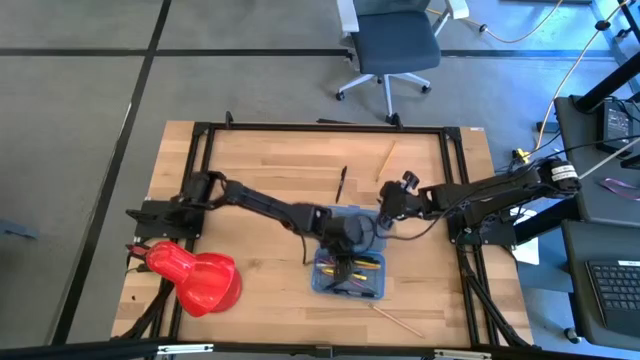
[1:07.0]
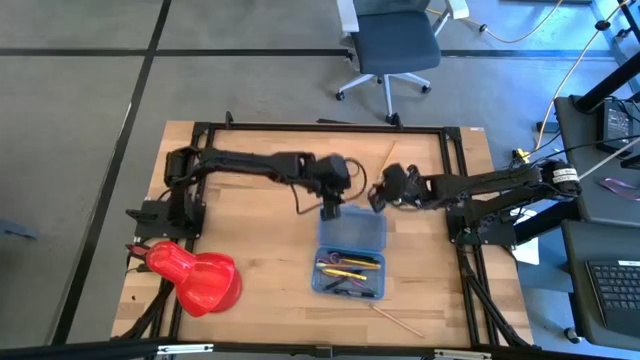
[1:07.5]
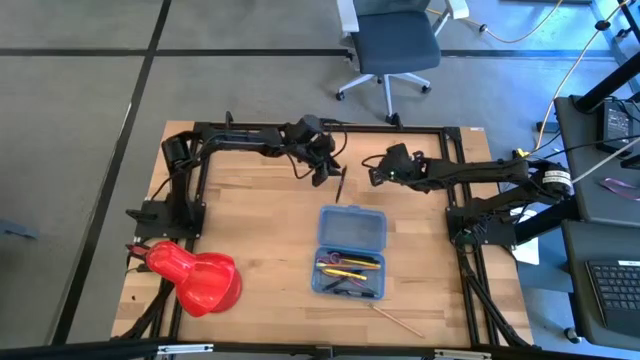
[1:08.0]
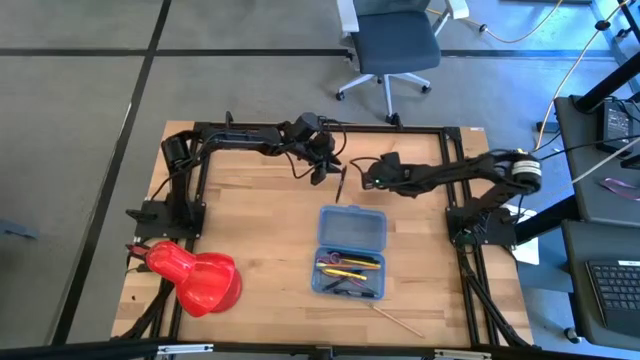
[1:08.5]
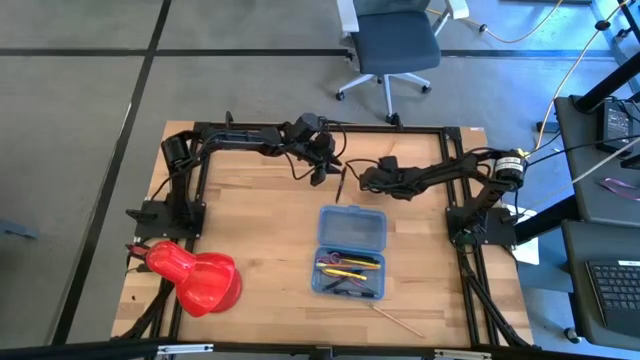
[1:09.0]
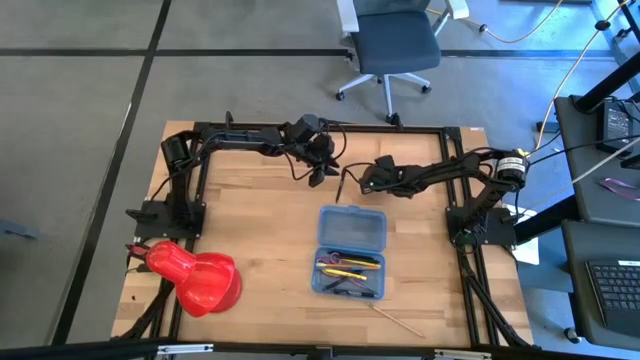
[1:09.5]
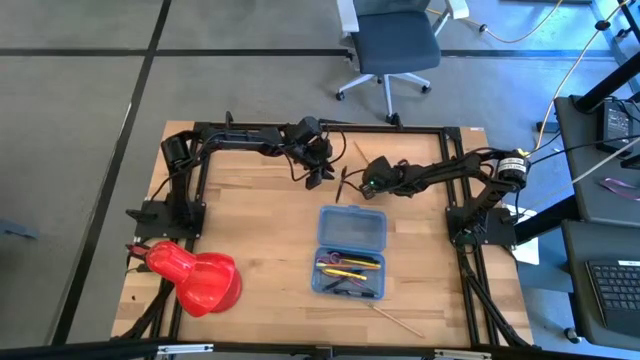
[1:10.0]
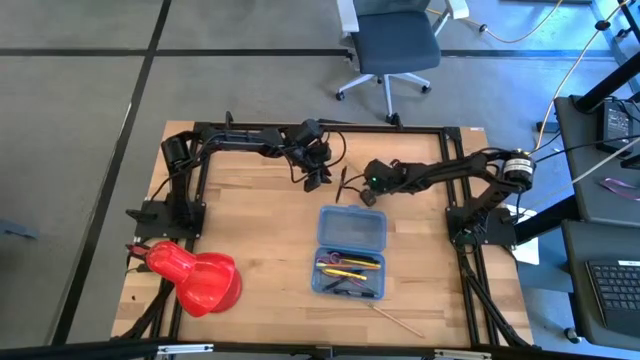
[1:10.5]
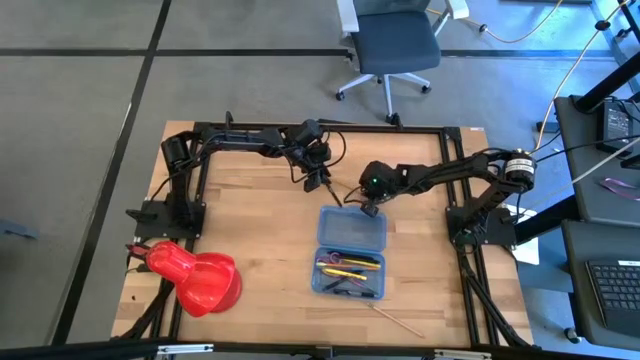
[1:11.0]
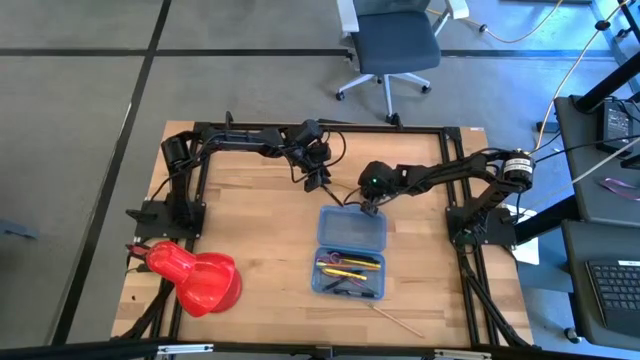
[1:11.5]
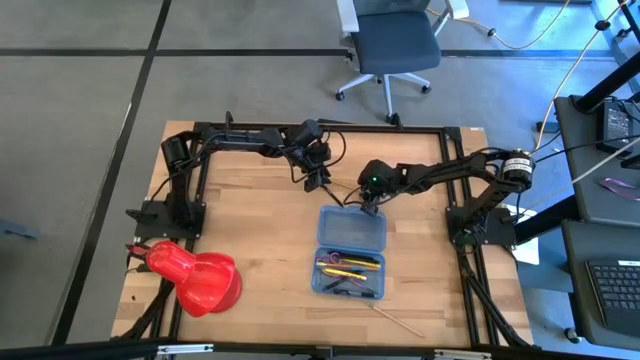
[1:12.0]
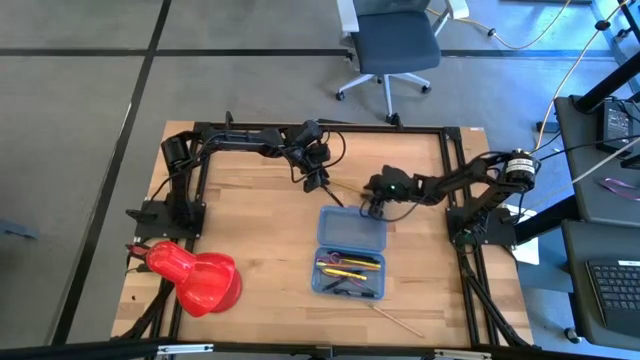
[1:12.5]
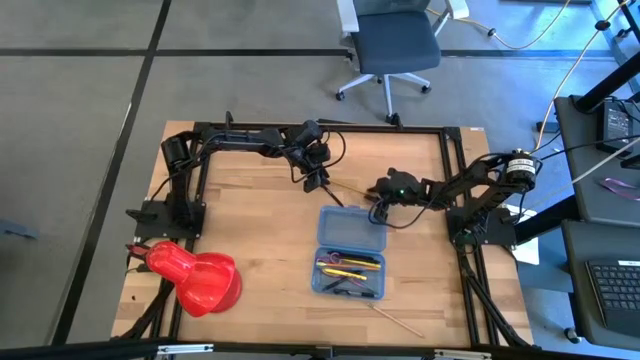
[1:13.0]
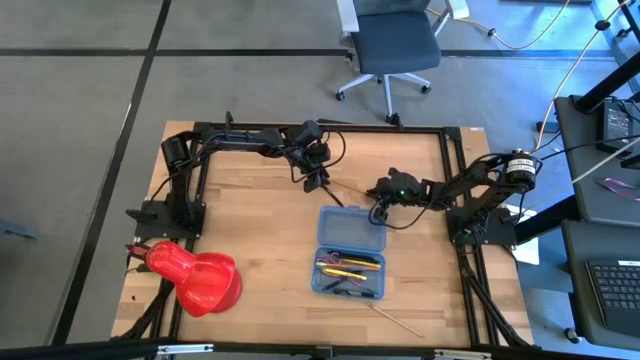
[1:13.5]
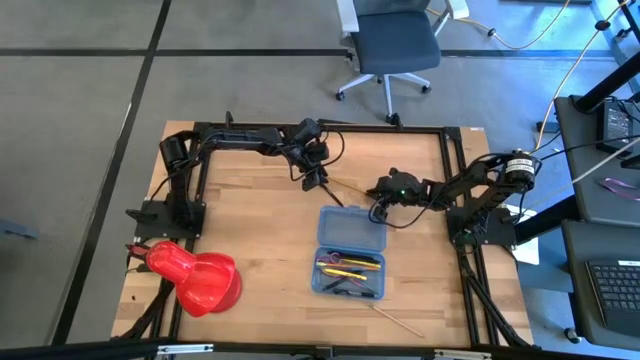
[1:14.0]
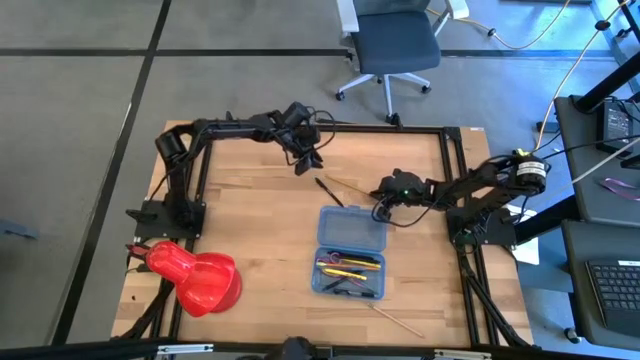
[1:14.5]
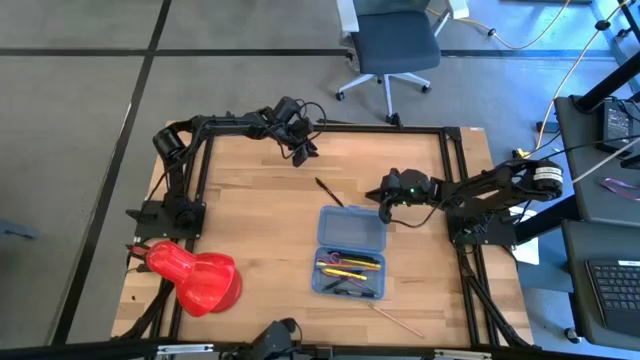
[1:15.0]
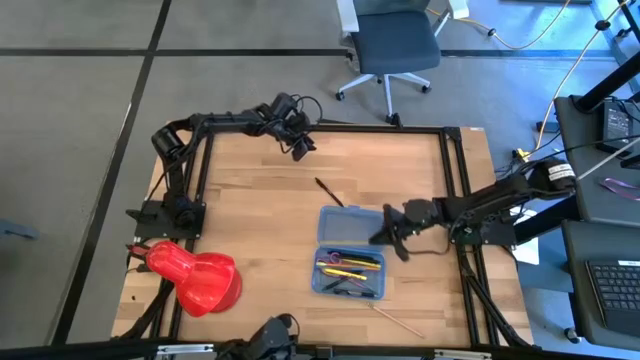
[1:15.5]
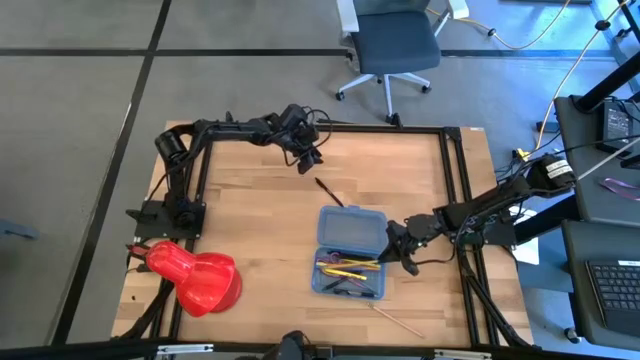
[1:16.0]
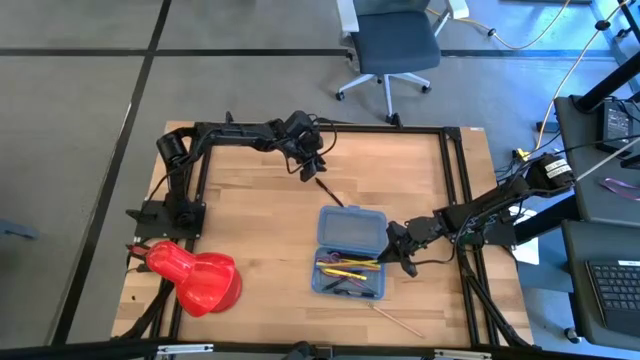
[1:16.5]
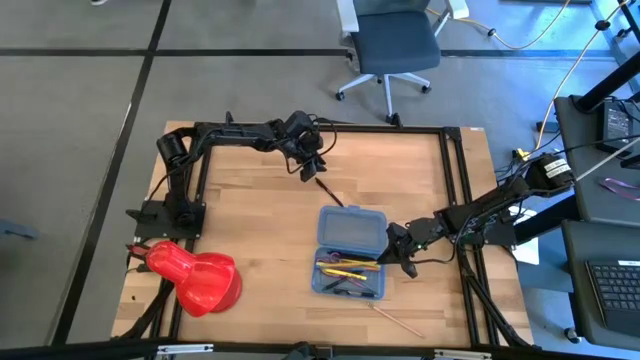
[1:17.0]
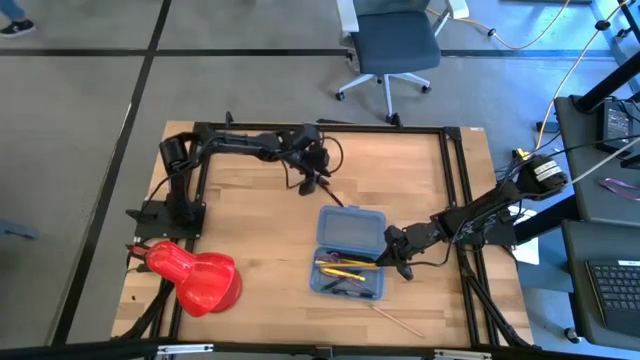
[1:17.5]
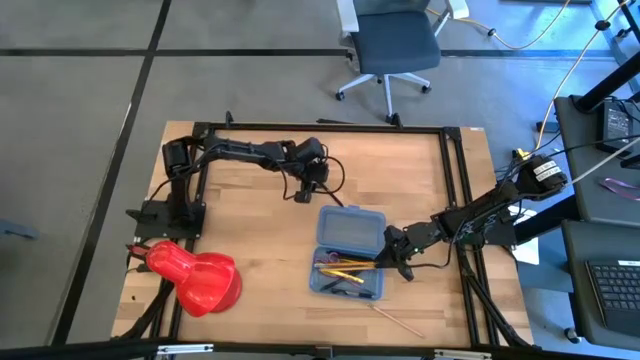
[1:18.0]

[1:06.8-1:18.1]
Task: Pick & place school supplies into a supply box
Put the top right yellow pencil into the blue supply box

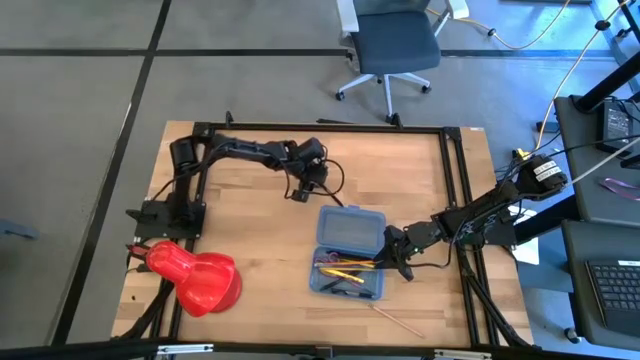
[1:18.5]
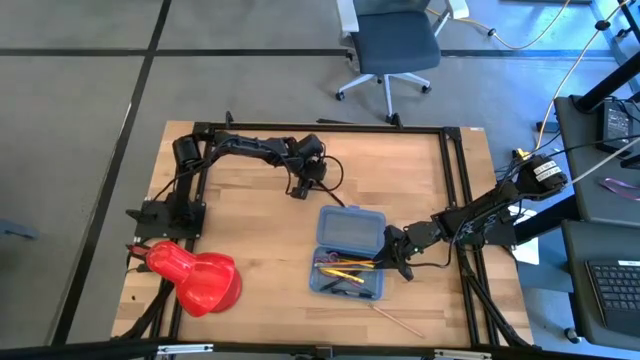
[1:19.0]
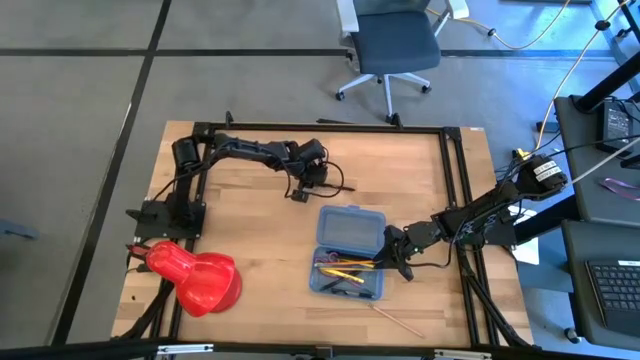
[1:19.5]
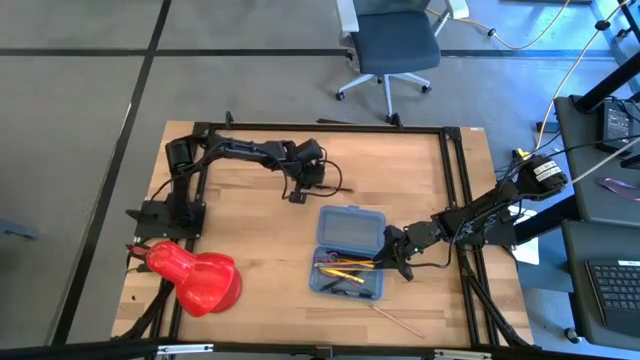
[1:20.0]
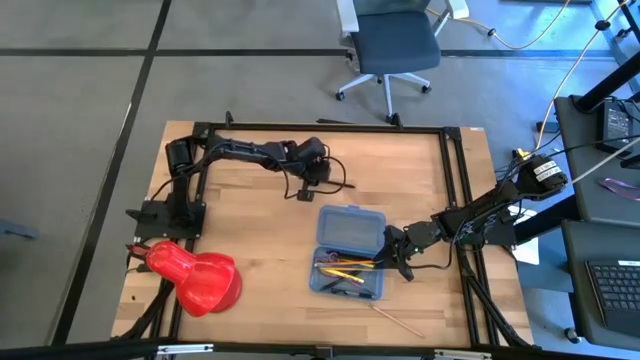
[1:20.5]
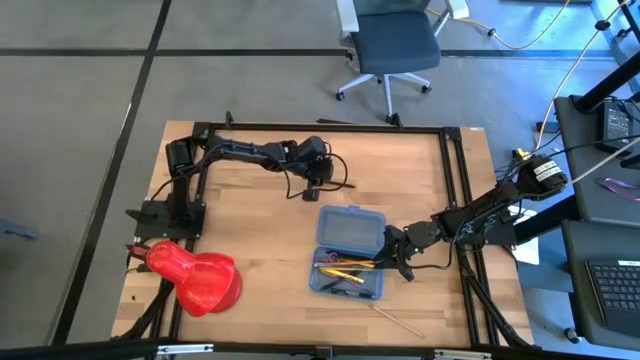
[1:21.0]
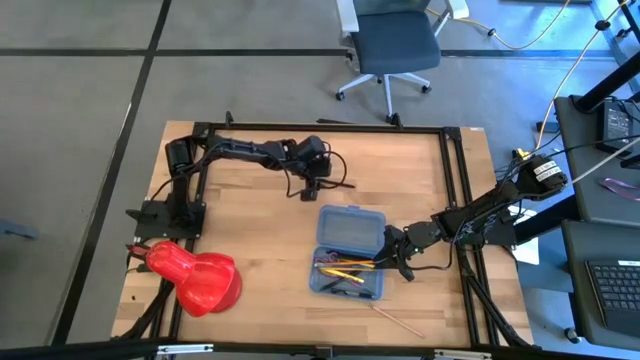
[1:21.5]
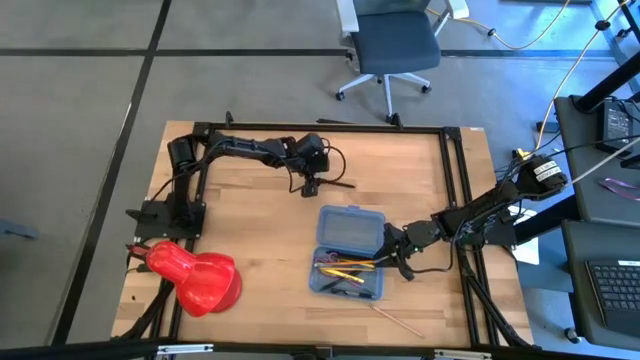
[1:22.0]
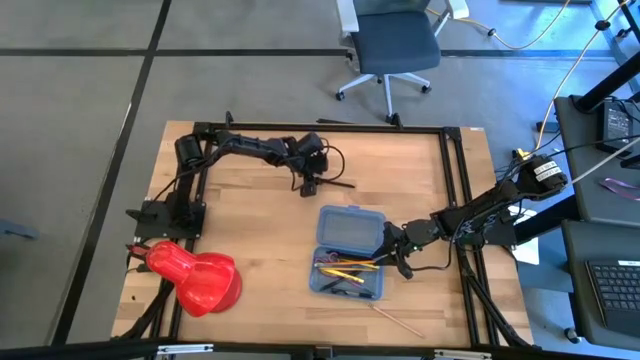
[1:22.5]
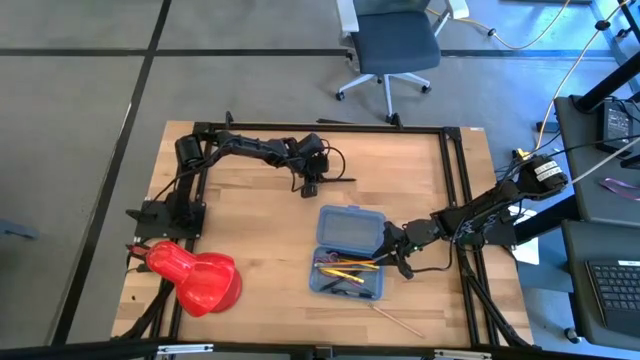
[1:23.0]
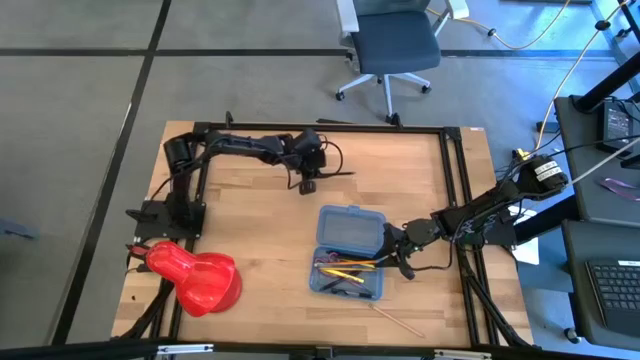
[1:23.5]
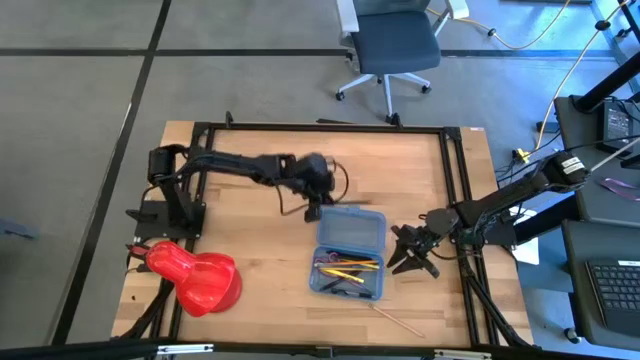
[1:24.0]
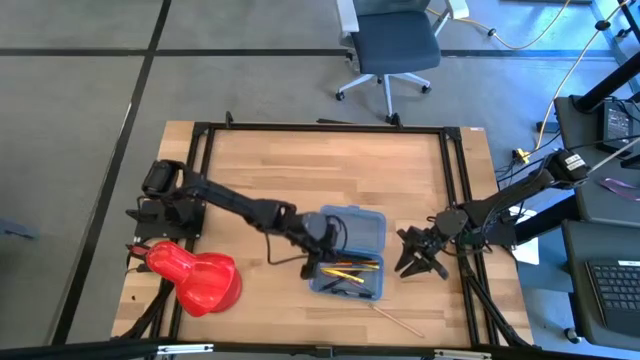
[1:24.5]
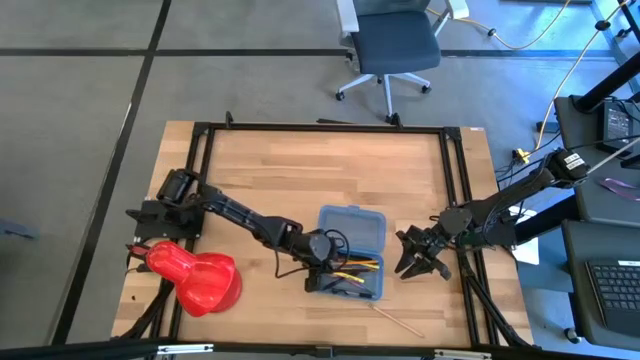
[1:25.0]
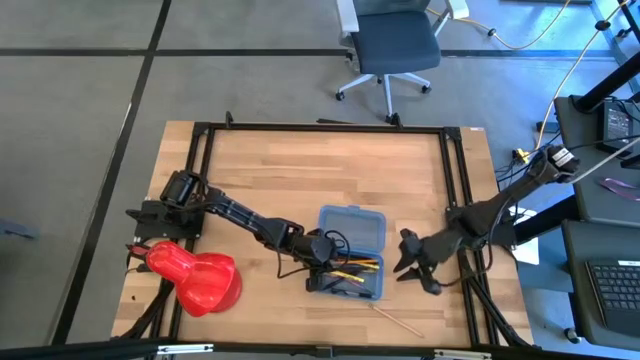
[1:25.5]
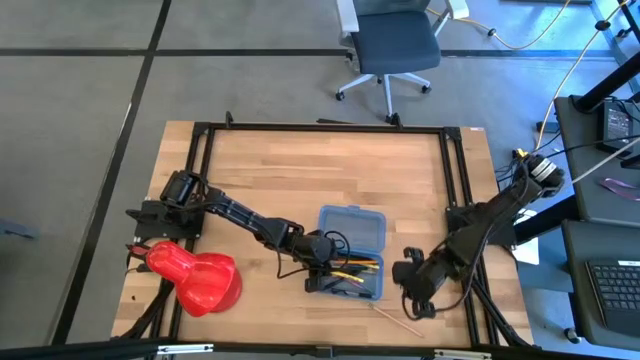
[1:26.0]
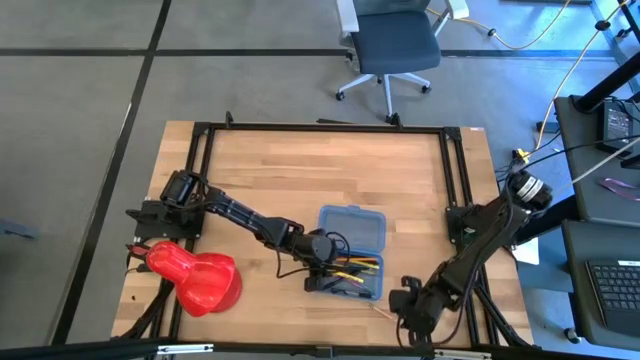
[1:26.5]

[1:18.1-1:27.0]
Put the top black pen into the blue supply box

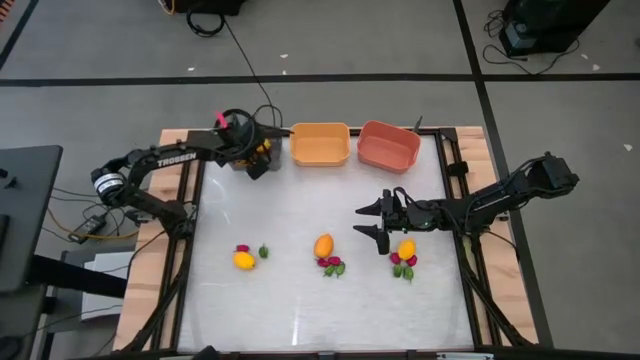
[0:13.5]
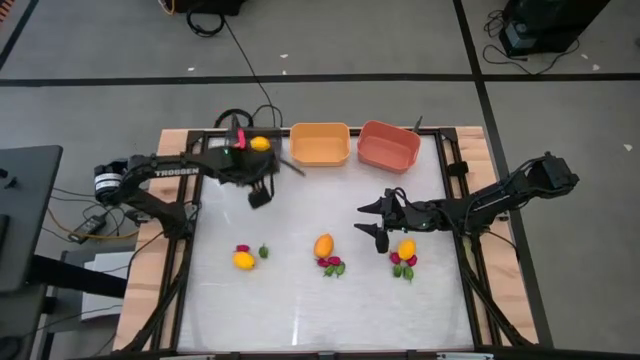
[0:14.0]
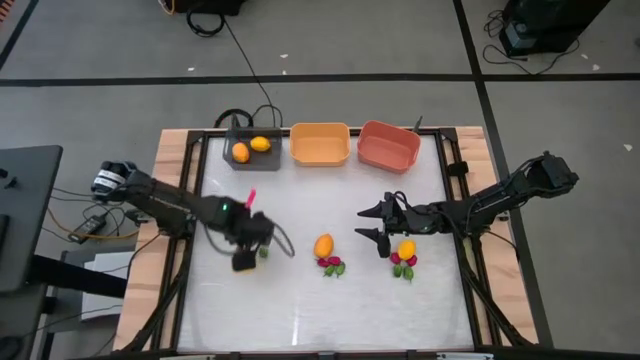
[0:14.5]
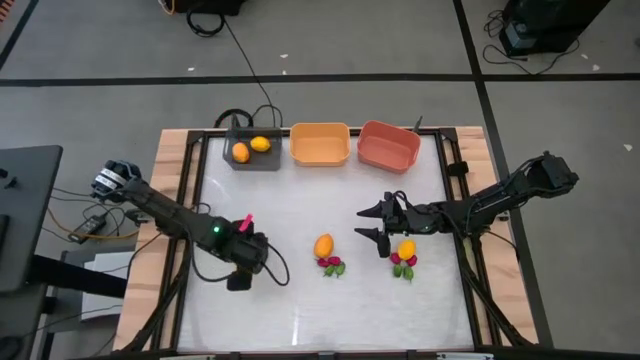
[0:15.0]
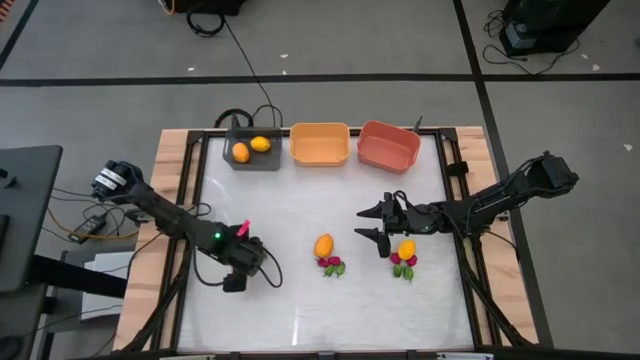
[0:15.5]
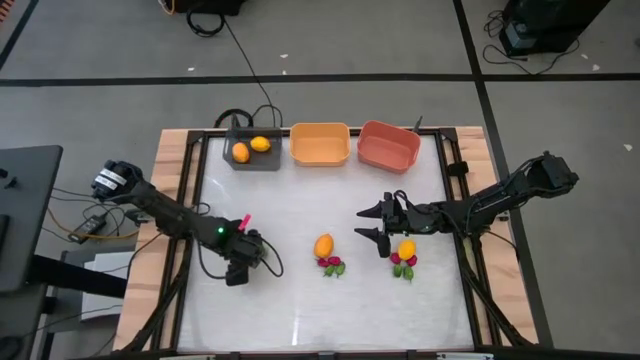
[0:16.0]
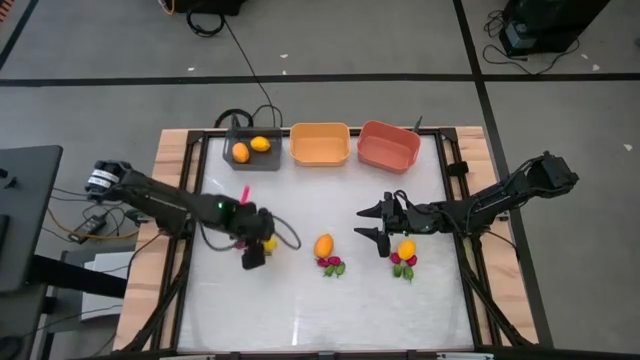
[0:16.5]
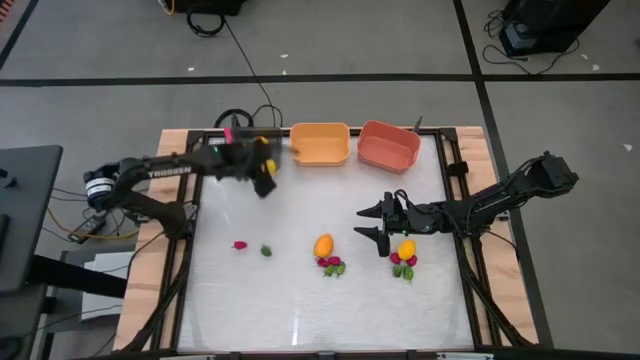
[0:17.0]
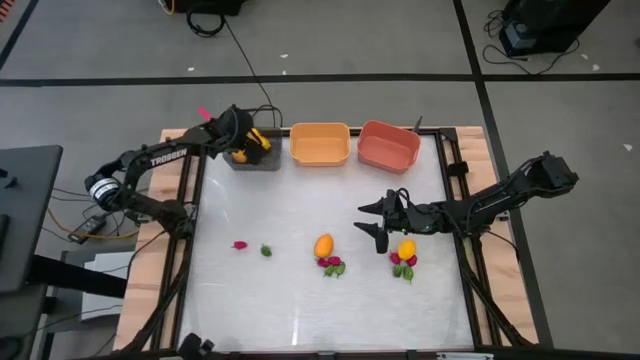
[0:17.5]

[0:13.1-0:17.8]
Task: Sort produce into baskets
Put the lemon into the black bin
